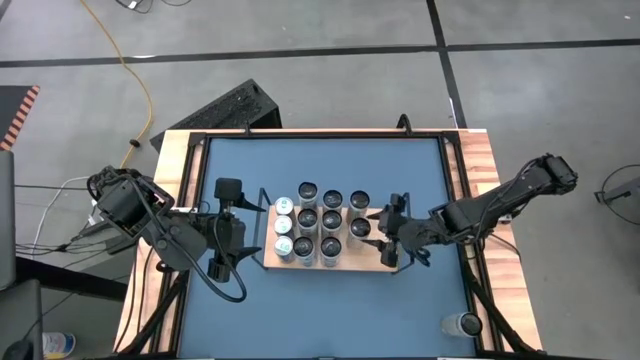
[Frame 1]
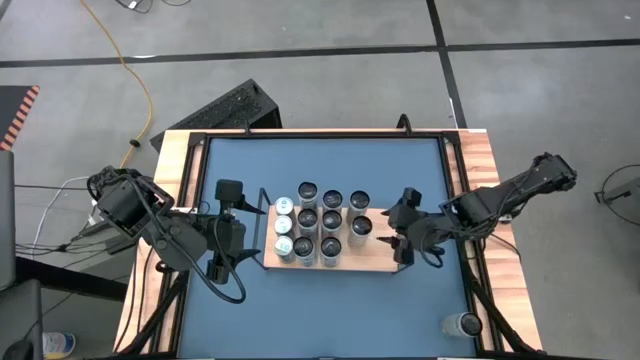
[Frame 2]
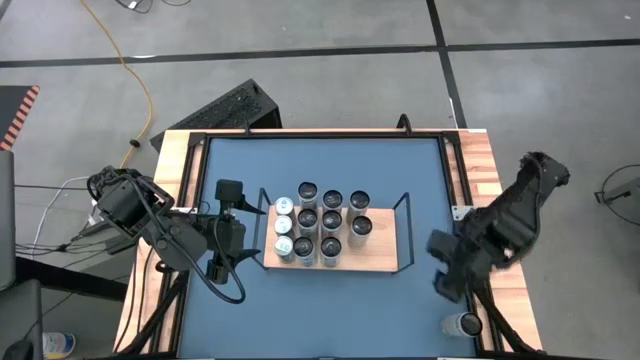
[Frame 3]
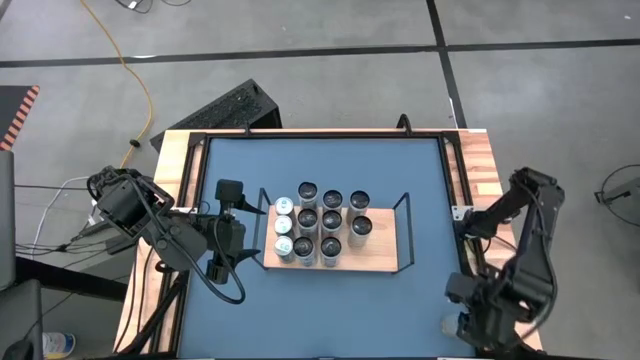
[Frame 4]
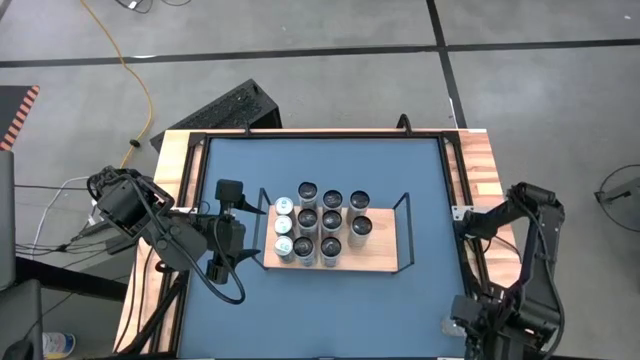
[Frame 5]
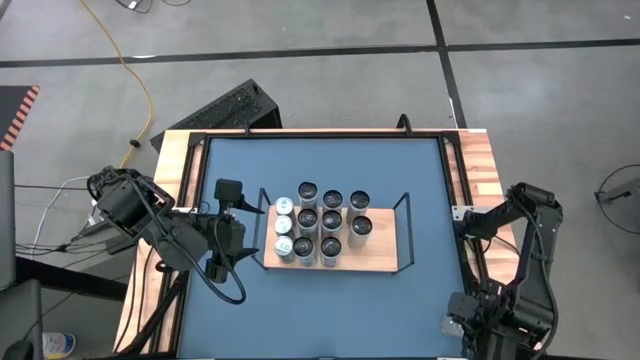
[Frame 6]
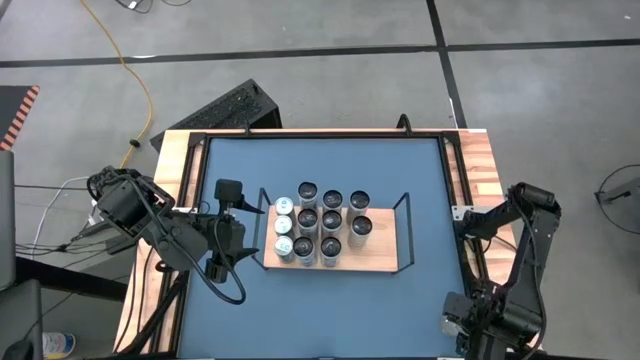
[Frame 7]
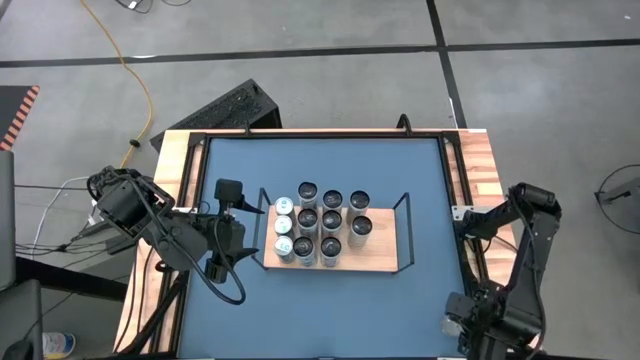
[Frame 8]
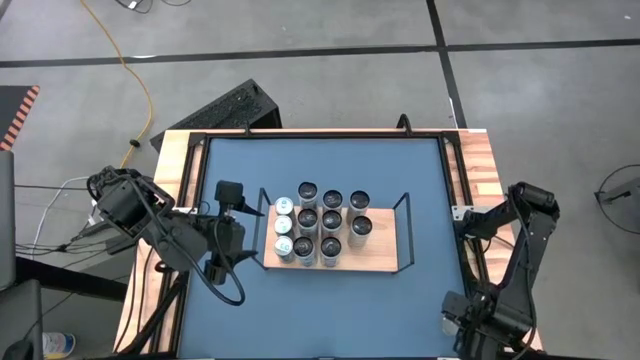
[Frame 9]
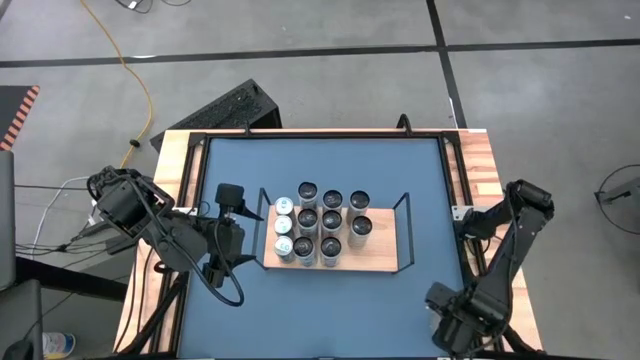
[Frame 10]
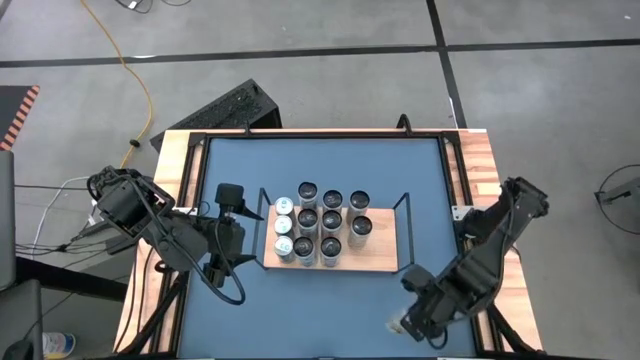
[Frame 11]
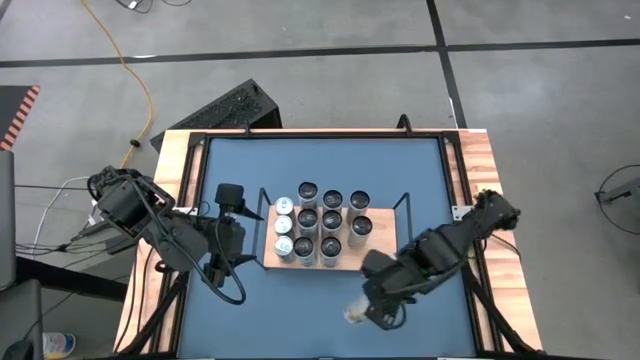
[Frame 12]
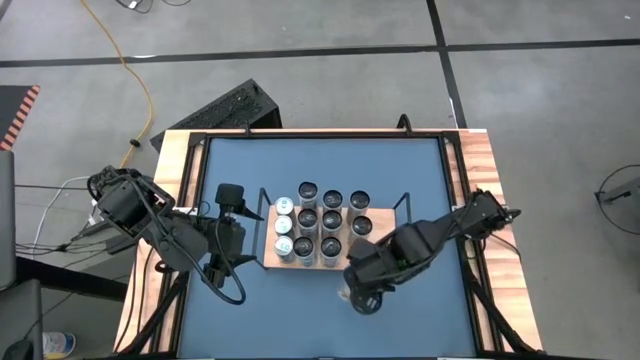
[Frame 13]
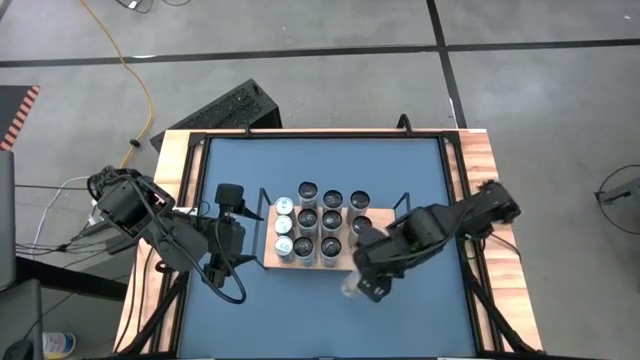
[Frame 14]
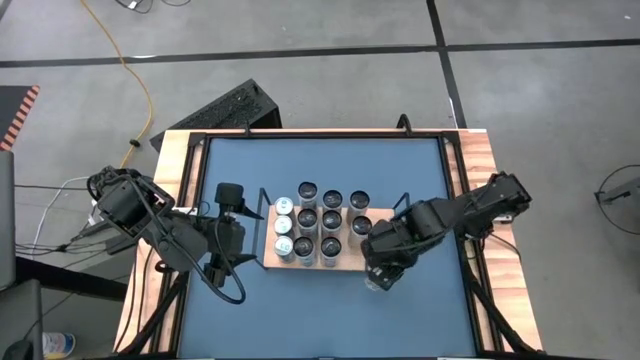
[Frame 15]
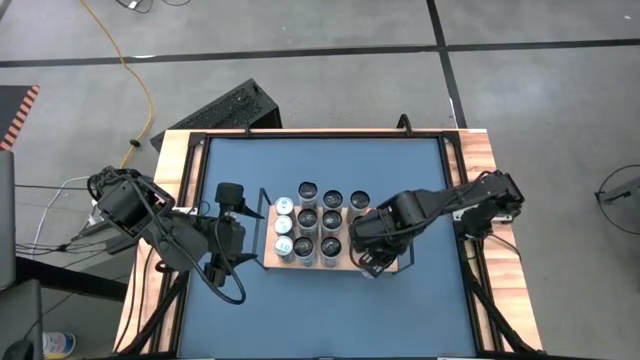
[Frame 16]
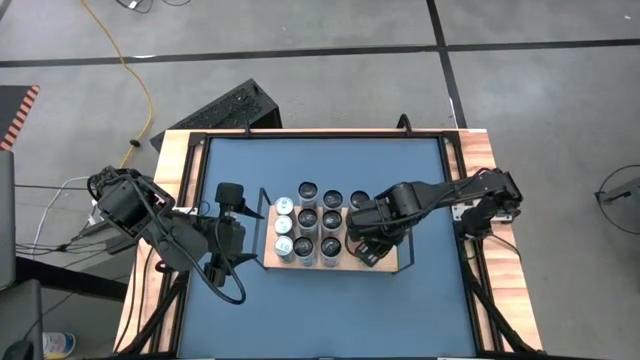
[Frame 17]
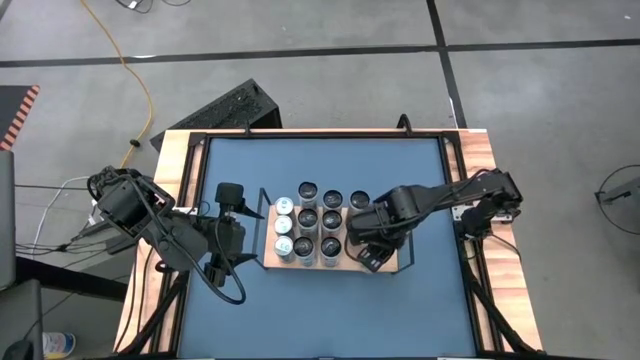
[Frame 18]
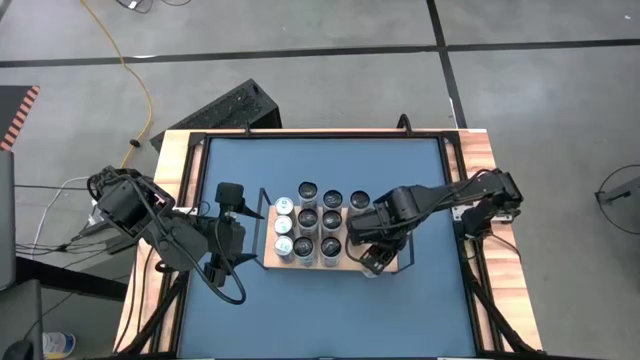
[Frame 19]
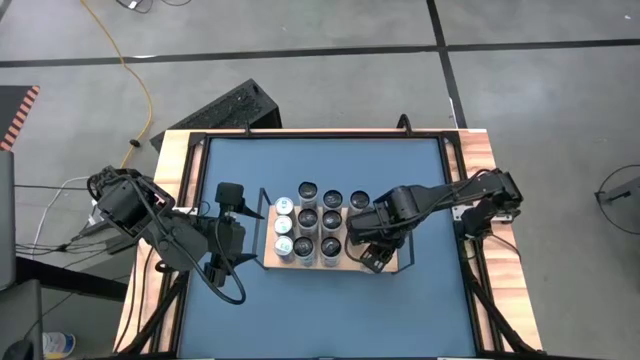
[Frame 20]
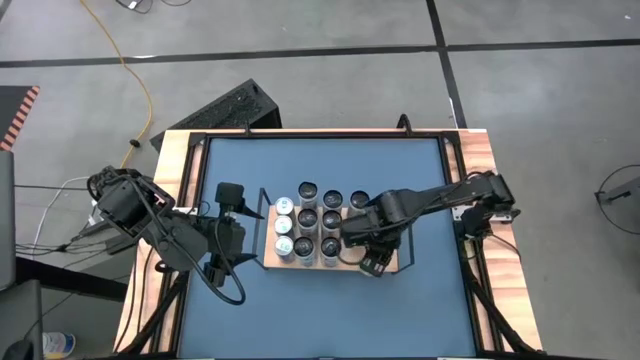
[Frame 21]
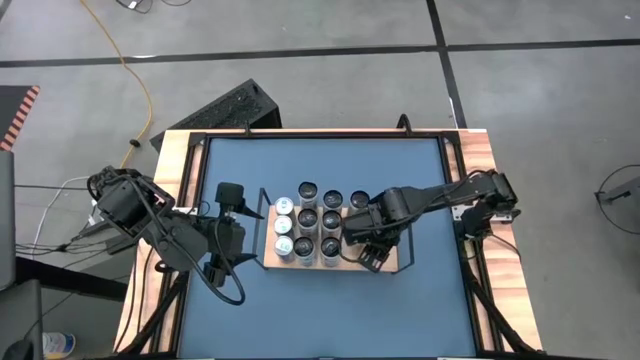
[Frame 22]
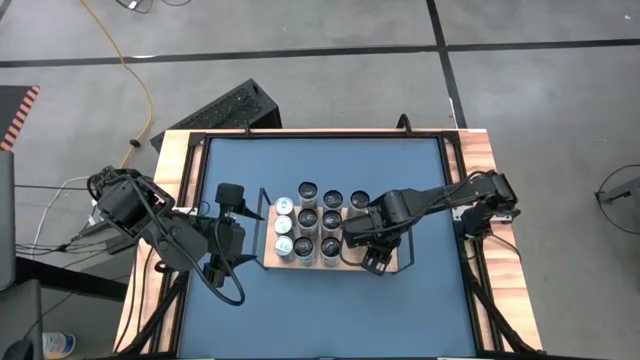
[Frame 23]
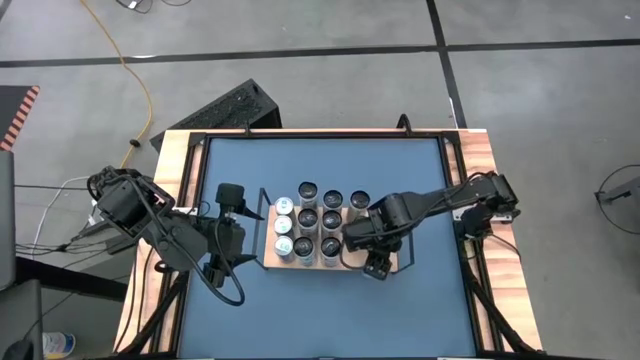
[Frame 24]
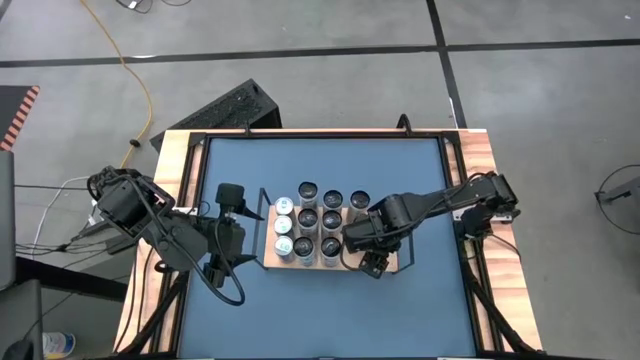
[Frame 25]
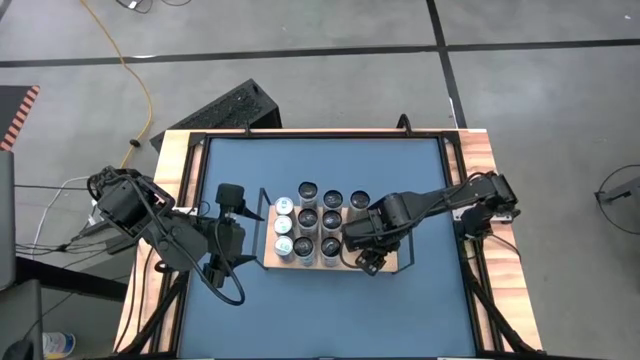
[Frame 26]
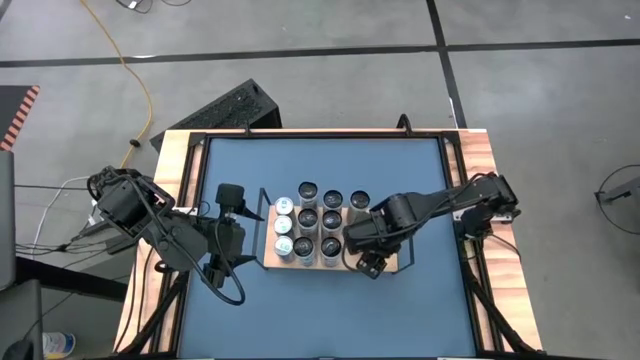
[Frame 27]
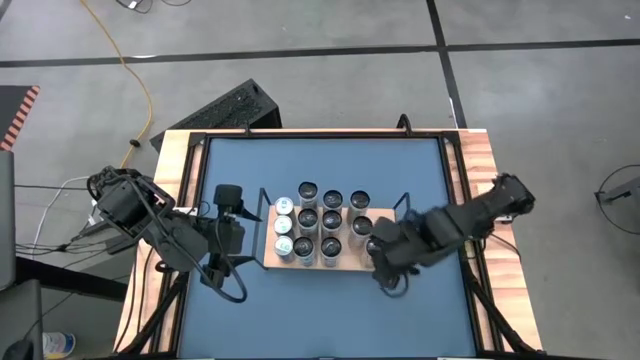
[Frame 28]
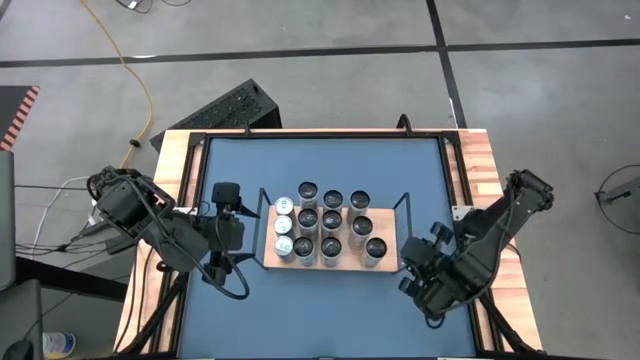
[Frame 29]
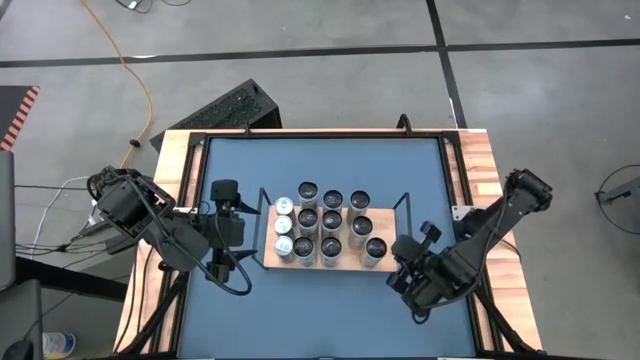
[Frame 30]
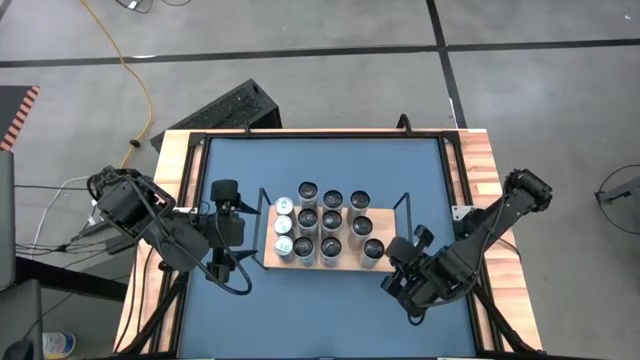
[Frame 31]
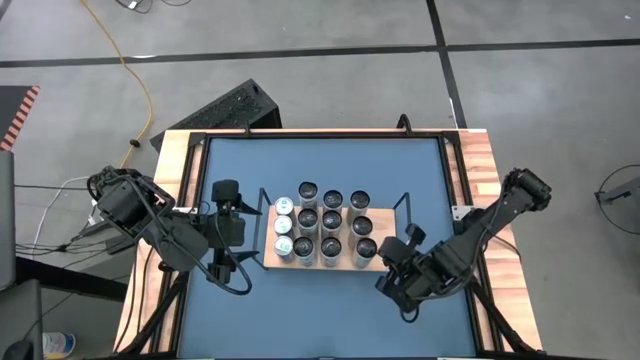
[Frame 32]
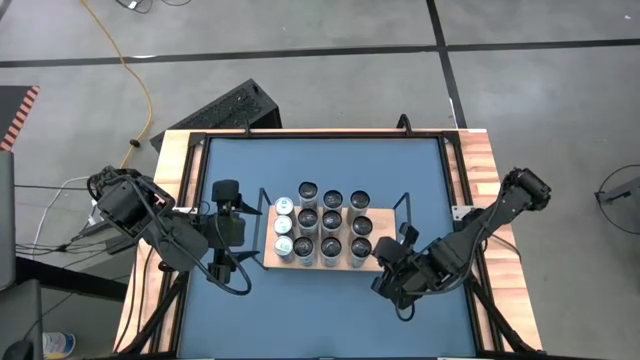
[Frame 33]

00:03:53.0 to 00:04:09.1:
Task: Place canned beverage on shelf
Put the yellow soda can on the shelf aligned with the other yellow soda cans

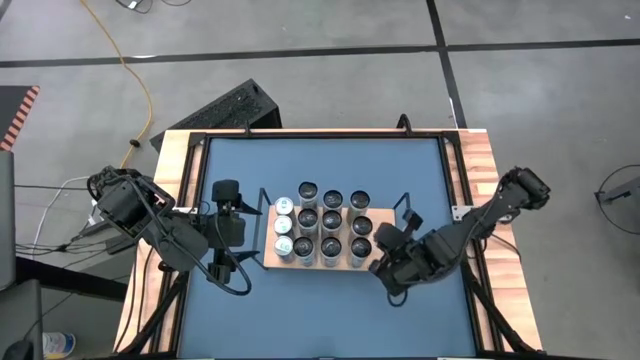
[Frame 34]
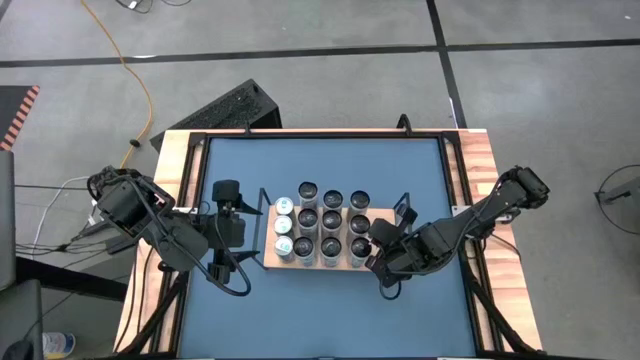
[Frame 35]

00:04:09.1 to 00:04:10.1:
Adjust the middle yellow soda can on the shelf

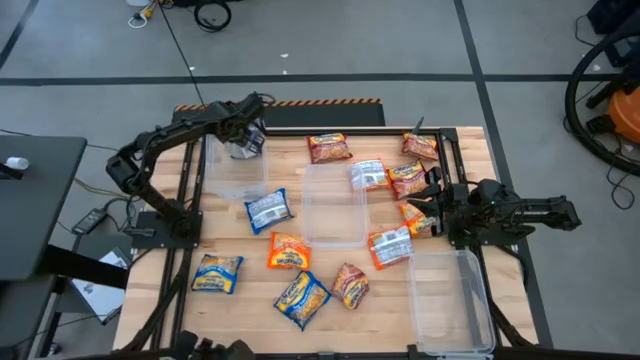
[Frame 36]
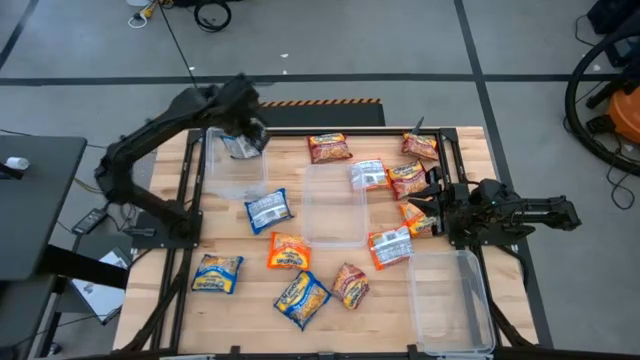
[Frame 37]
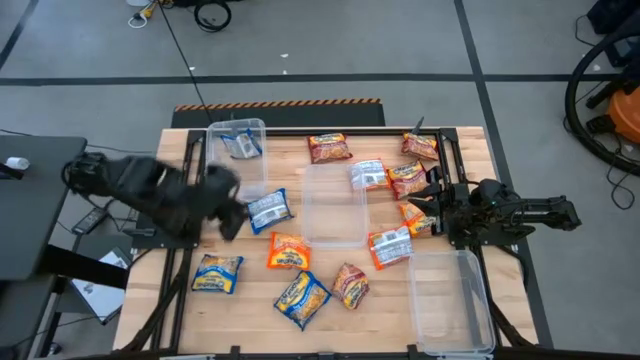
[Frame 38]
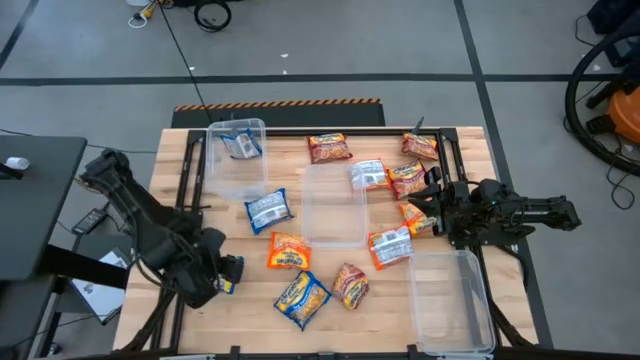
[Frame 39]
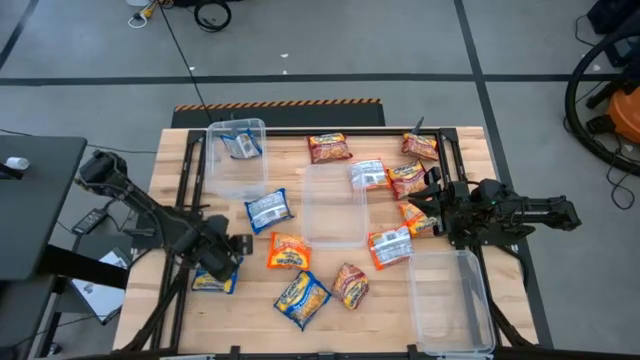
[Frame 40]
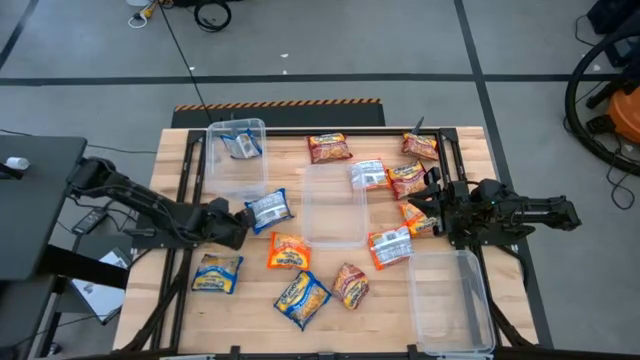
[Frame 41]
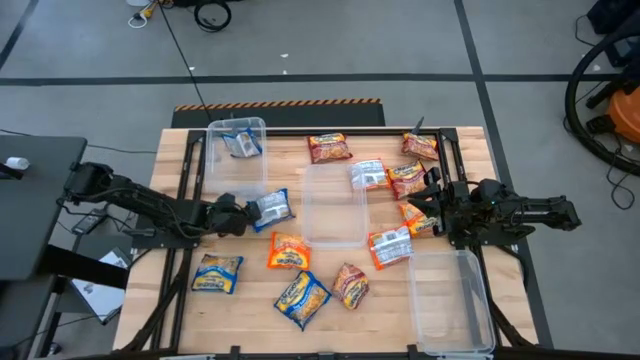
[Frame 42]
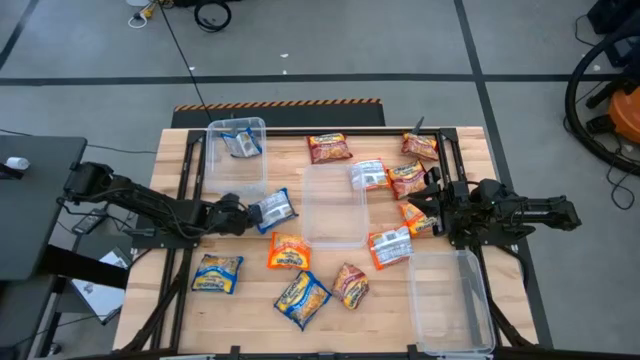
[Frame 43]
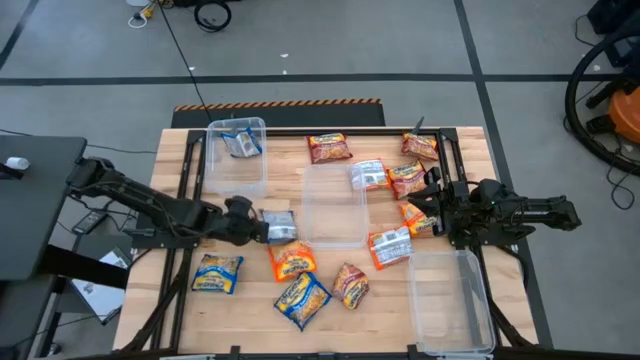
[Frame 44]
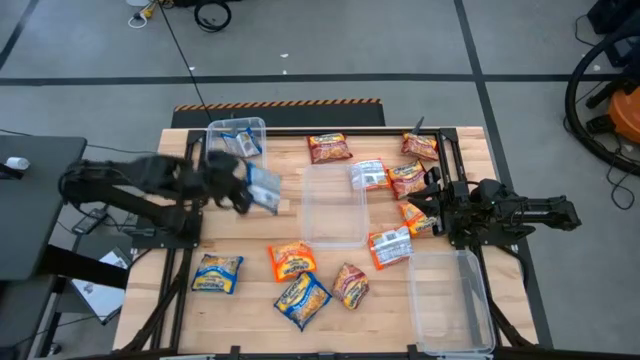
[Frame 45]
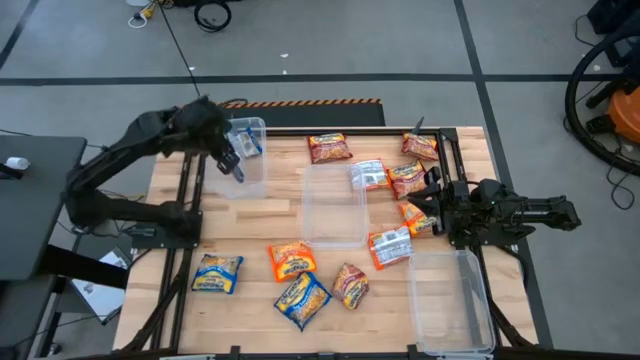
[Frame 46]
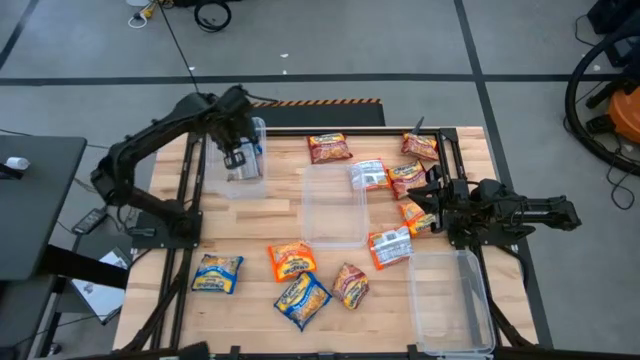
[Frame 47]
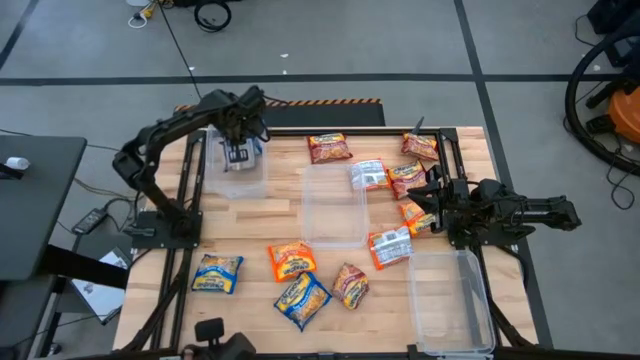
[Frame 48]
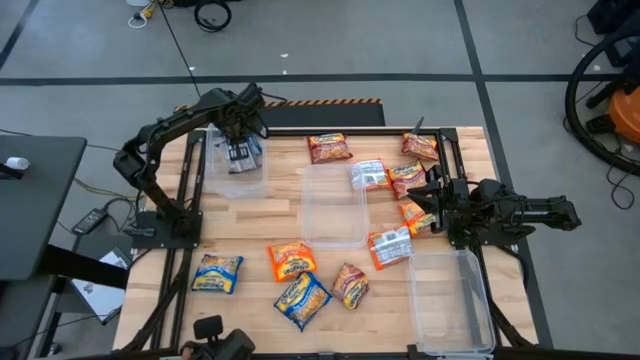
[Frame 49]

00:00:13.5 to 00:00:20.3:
Task: Sort Maruchan noodles
Put the blue noodle pack into the top transparent bin
